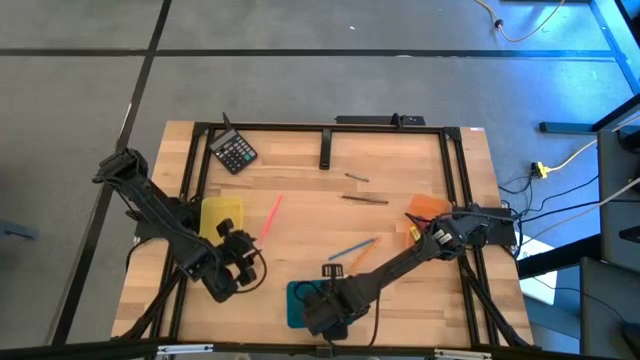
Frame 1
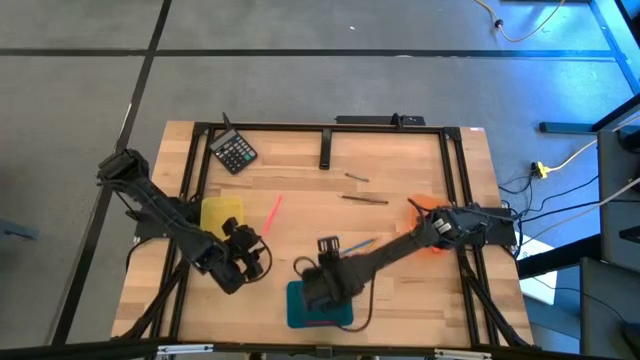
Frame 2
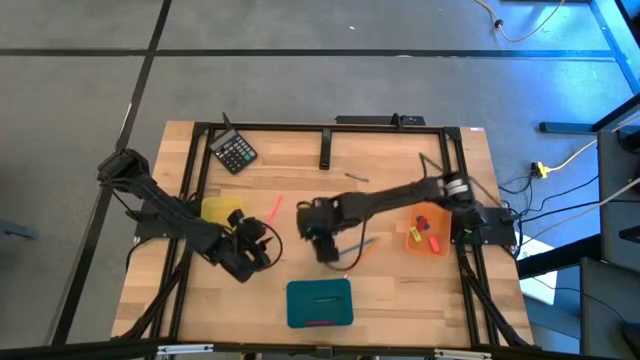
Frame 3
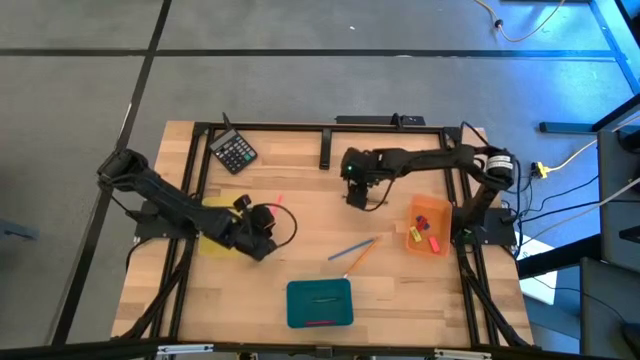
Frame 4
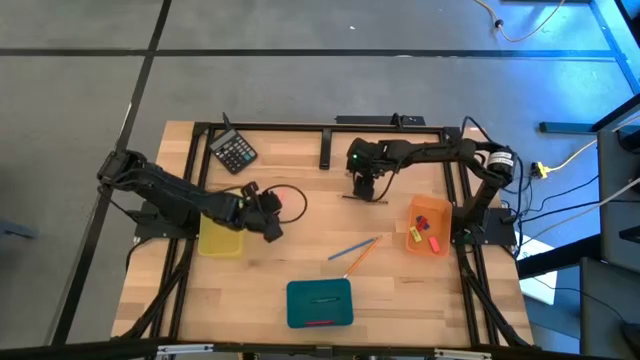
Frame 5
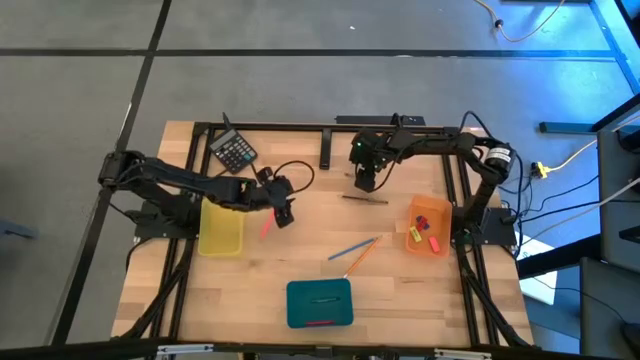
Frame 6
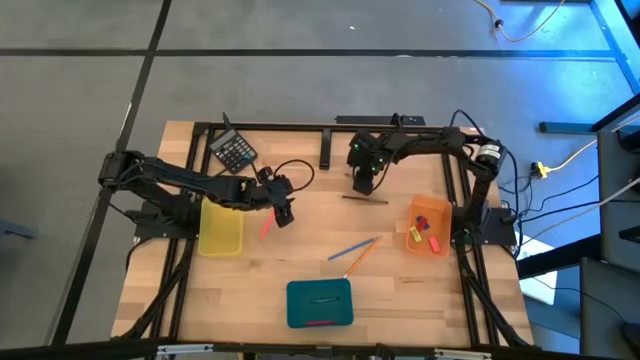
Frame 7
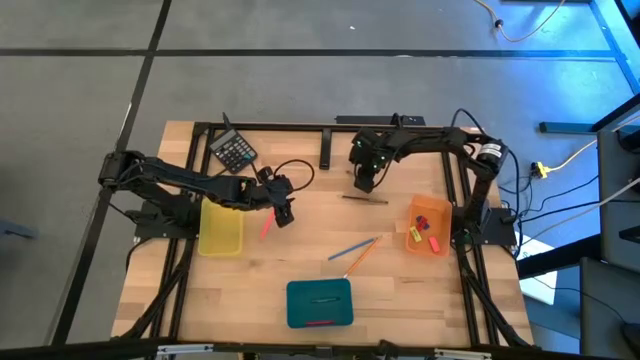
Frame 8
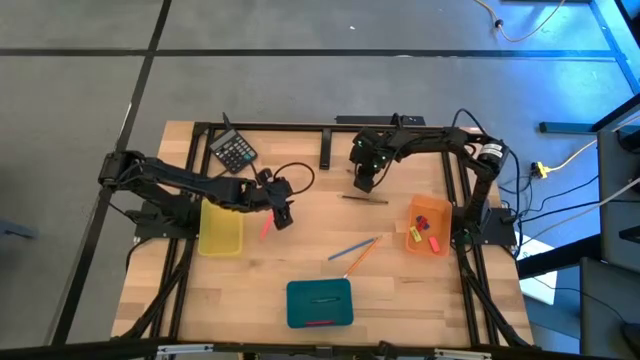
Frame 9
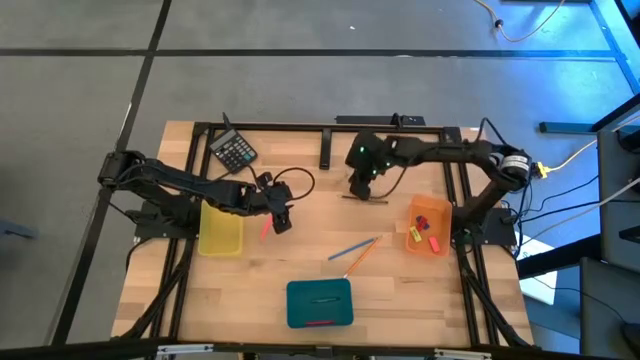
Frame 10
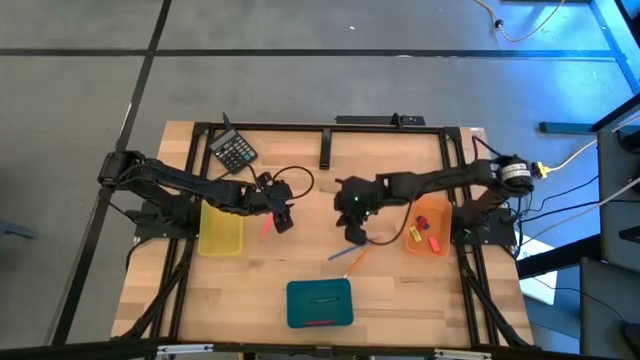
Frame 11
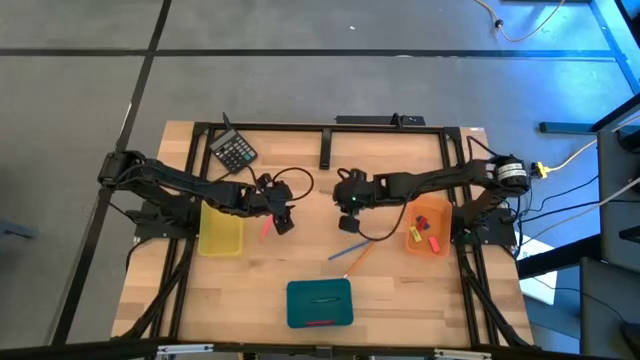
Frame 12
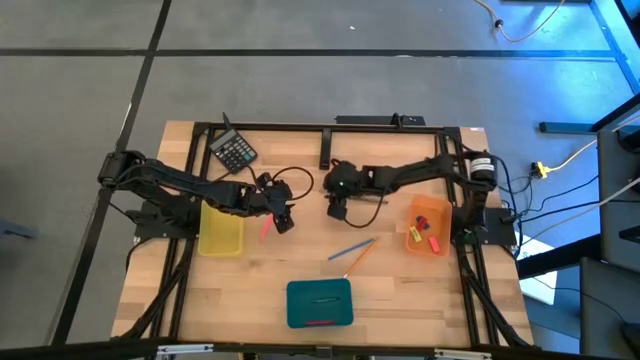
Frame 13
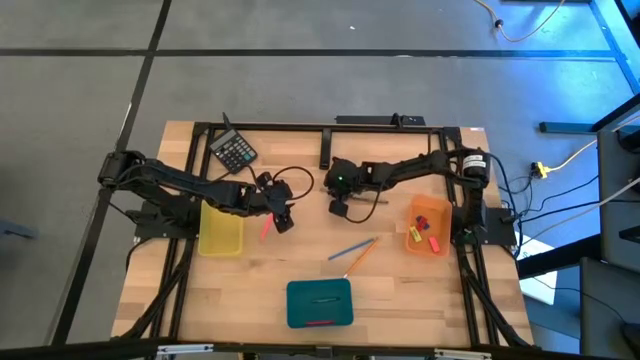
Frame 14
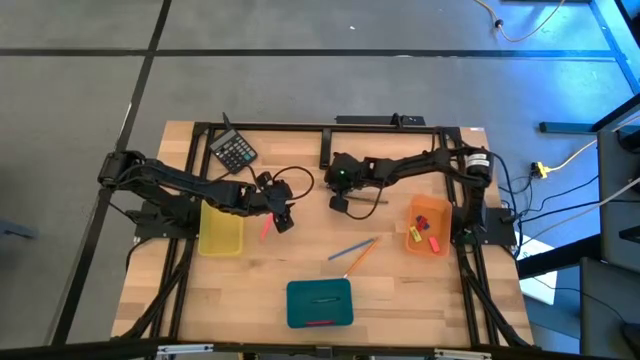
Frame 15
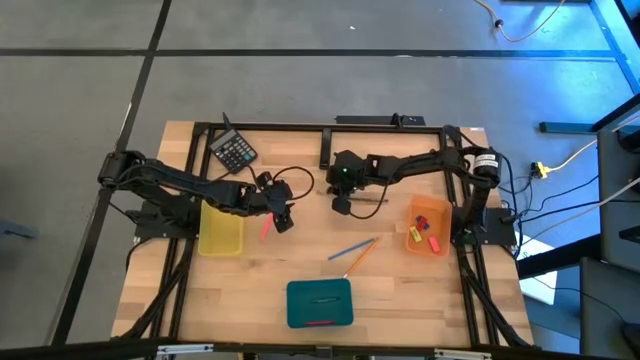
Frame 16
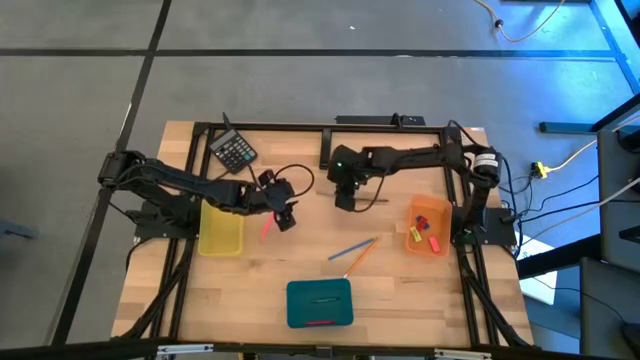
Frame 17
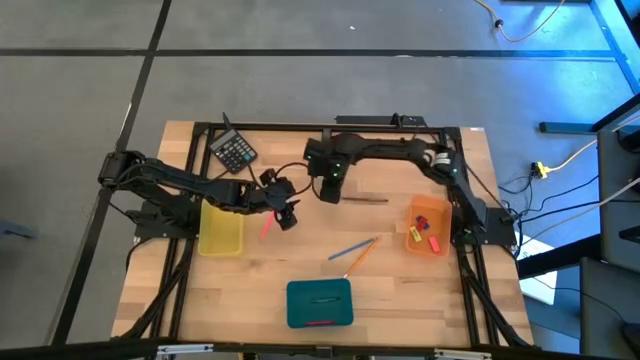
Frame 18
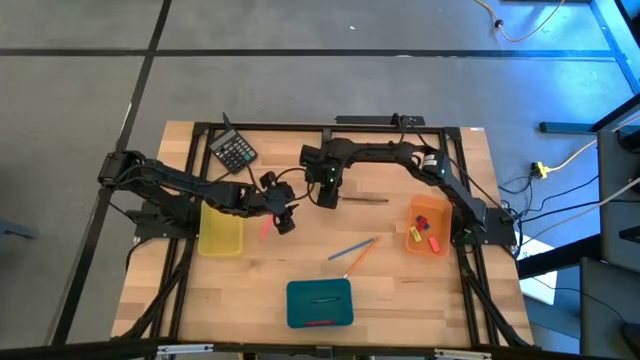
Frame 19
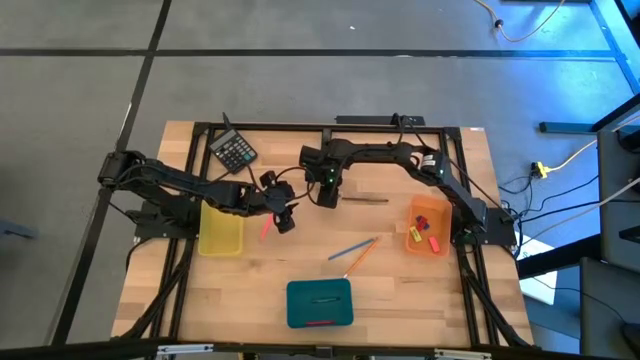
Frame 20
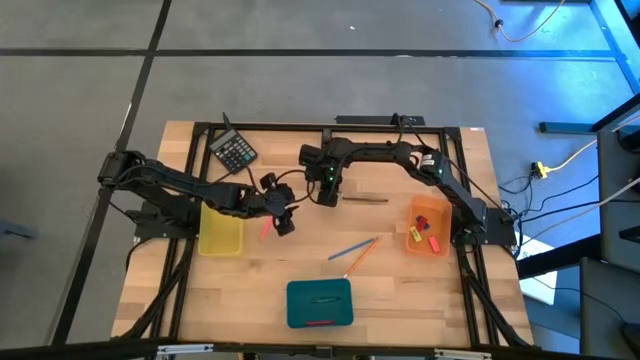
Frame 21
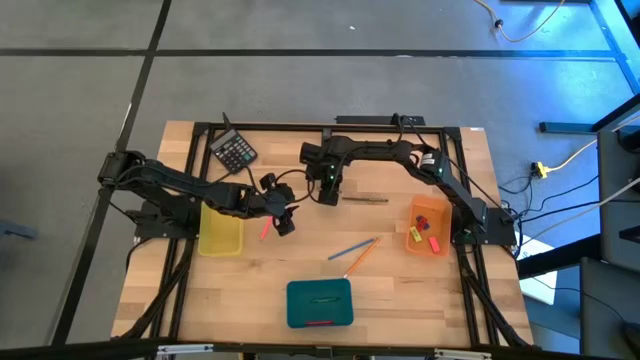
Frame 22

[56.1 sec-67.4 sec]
Task: Sort crayons/erasers/pens/pencils in bins
Put the gray crayon into the blue bin

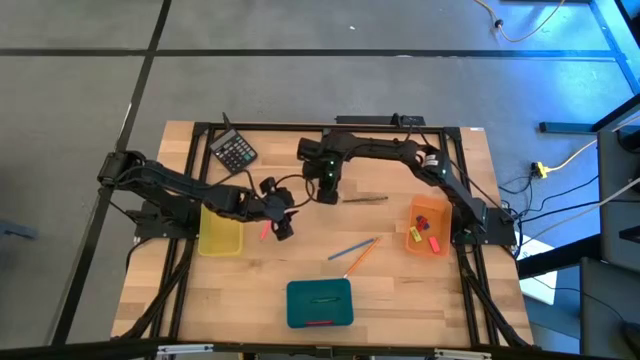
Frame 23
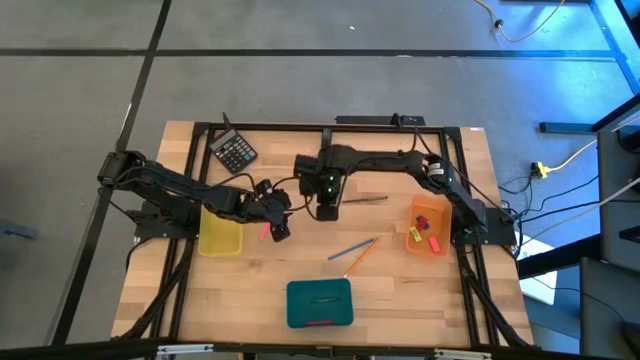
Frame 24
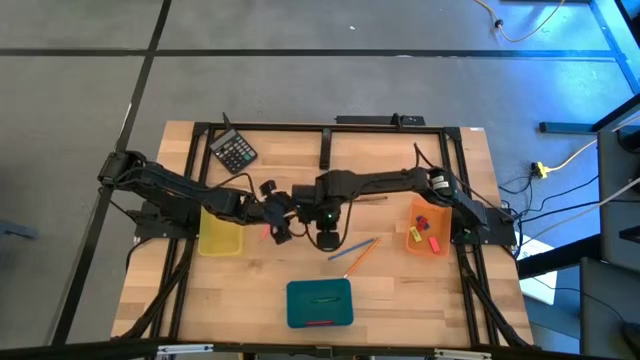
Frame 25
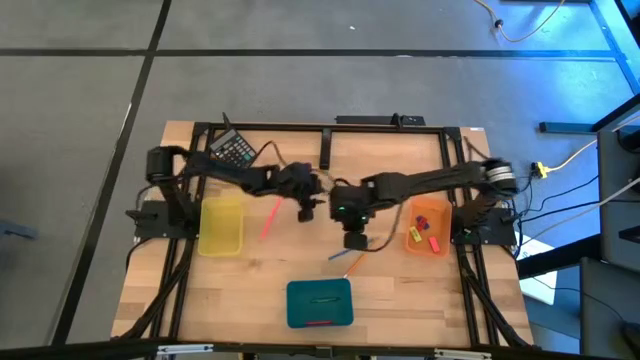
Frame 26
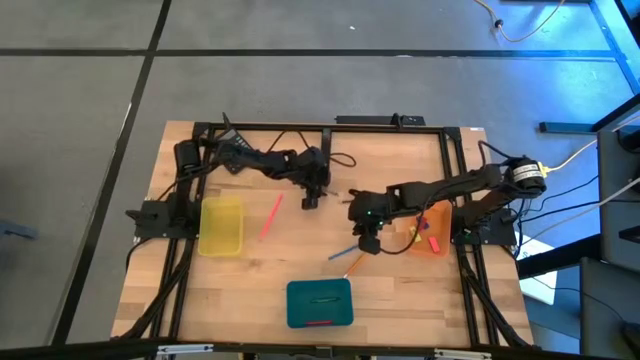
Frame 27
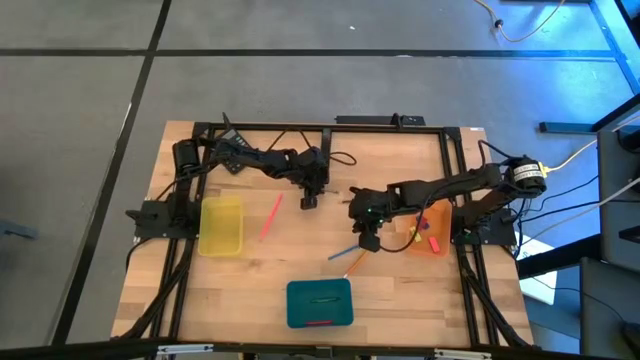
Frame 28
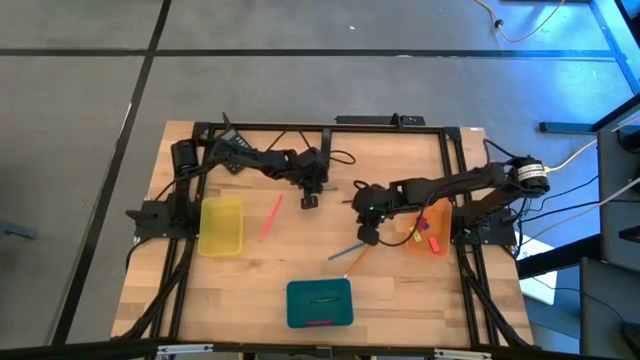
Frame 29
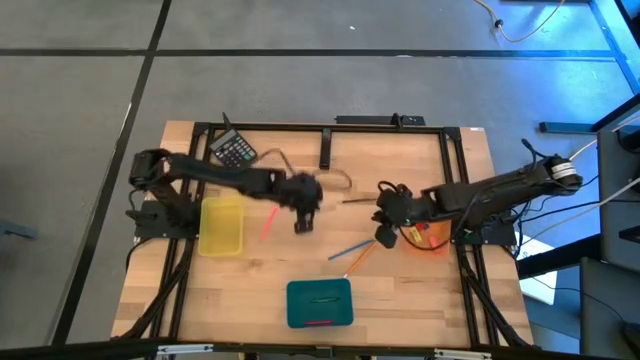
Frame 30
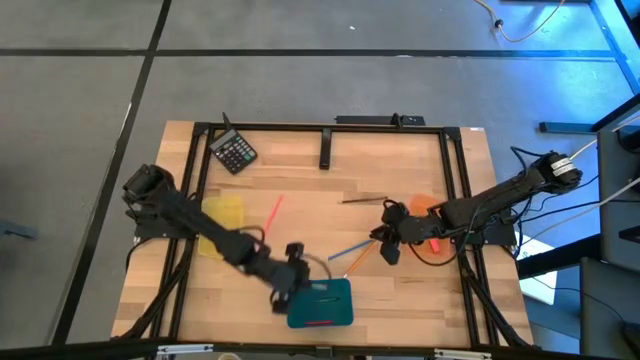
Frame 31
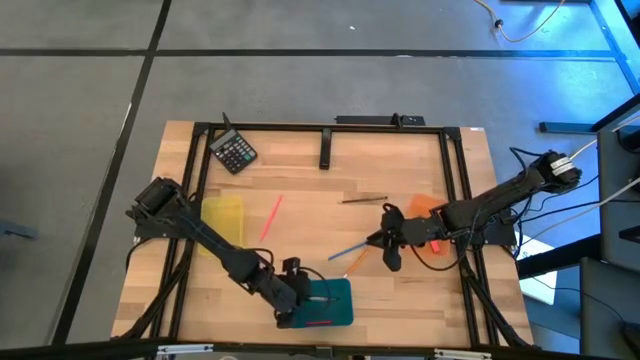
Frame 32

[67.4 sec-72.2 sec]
Put the gray crayon into the blue bin

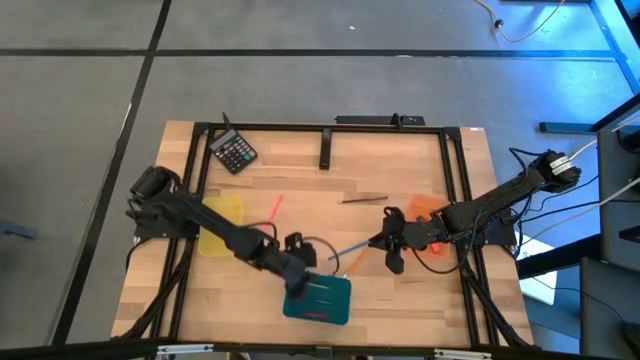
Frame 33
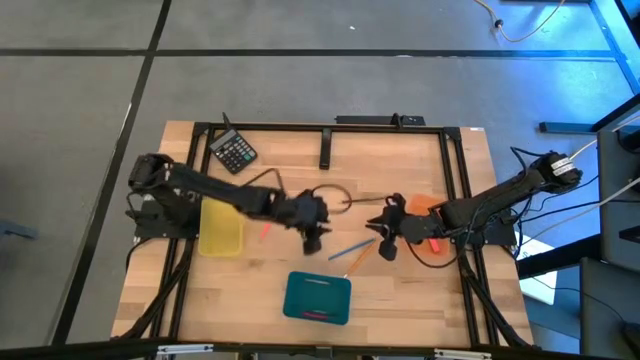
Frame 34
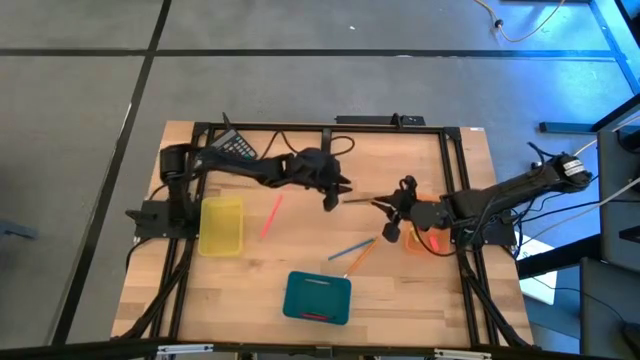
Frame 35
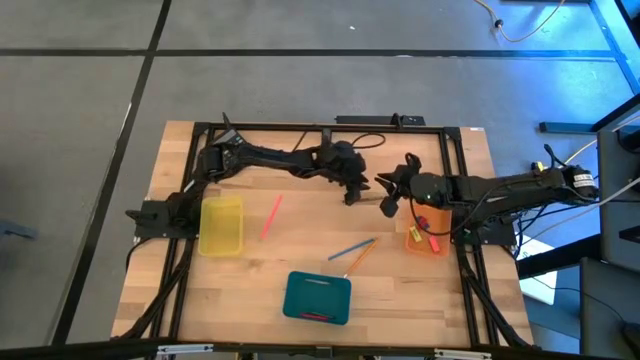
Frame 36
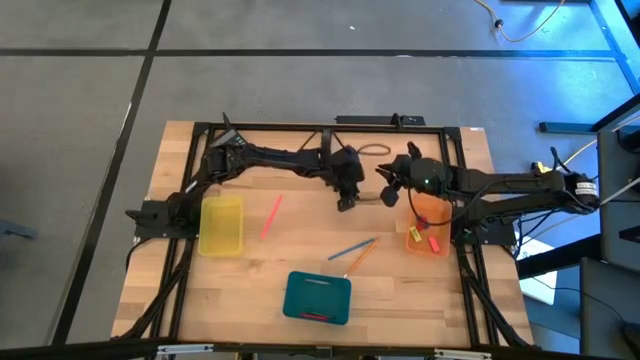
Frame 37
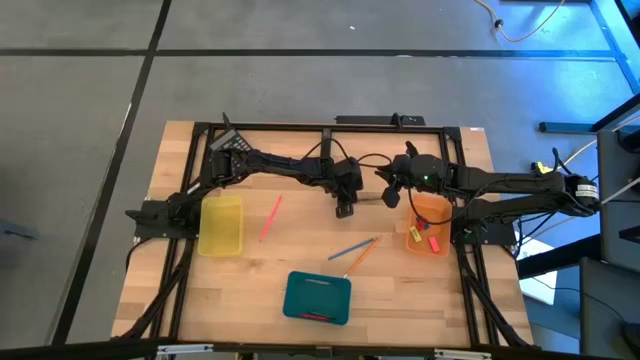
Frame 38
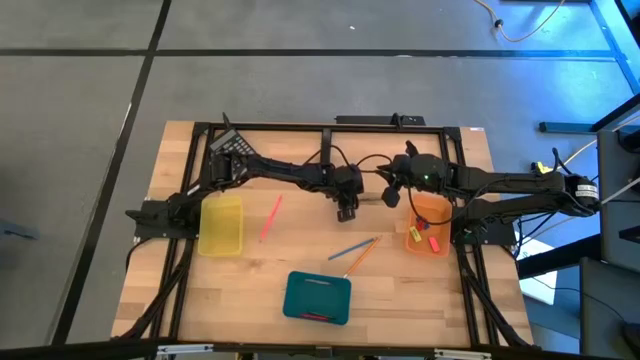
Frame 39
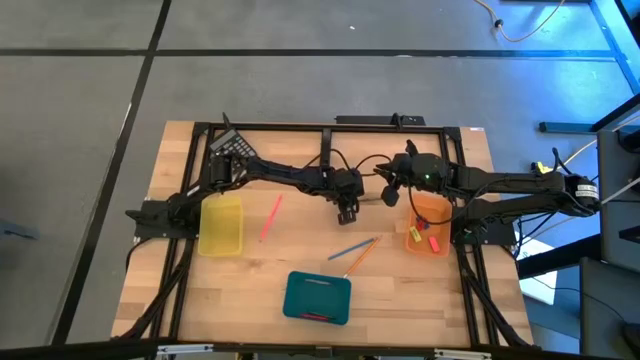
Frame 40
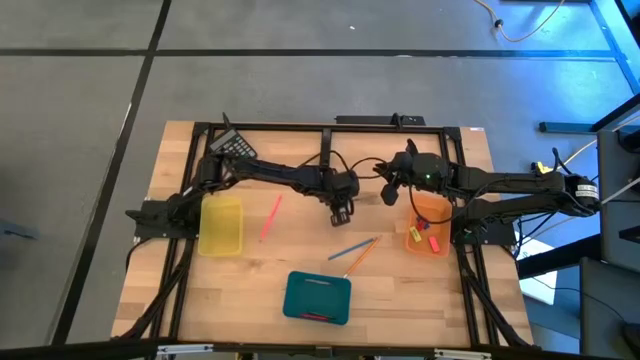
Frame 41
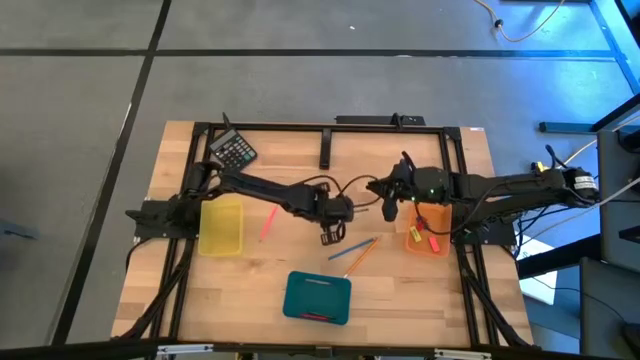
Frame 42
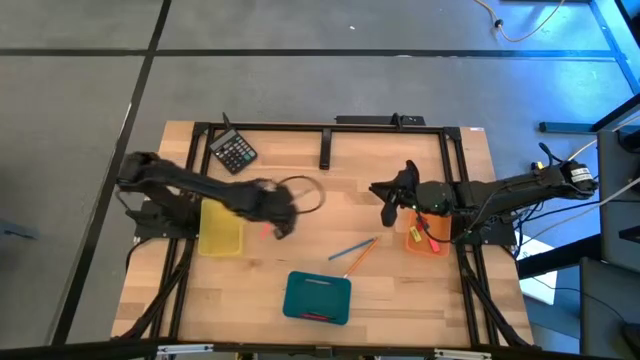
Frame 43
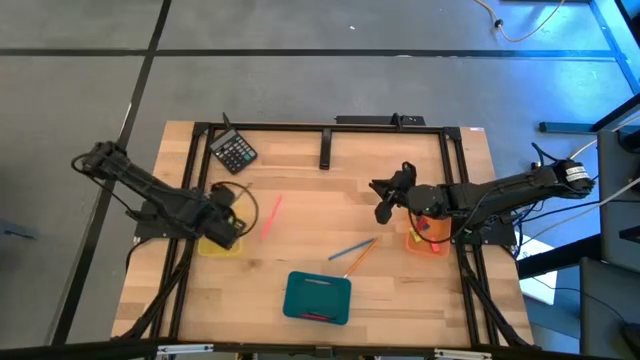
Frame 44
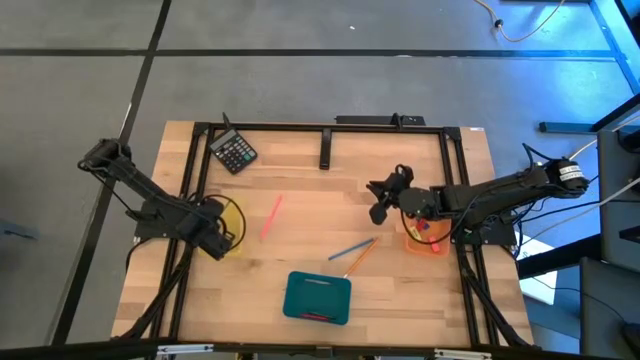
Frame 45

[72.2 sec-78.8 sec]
Put the black colored pencil into the yellow bin
